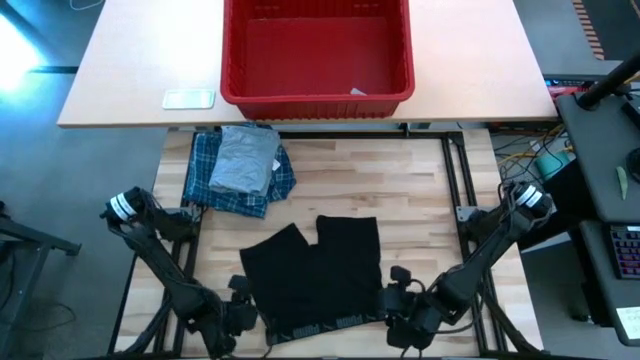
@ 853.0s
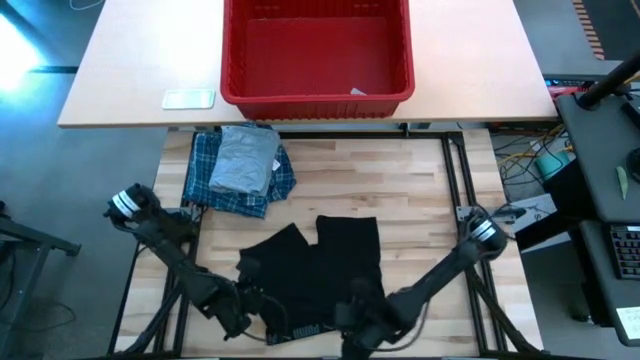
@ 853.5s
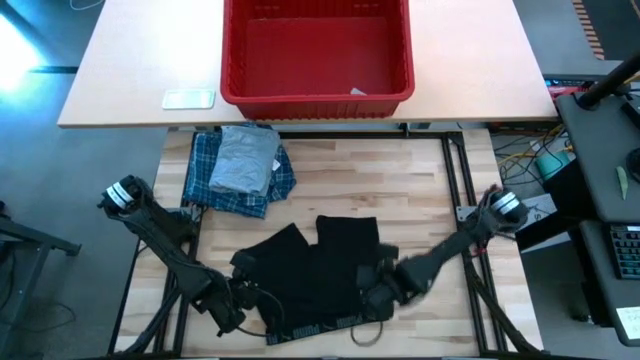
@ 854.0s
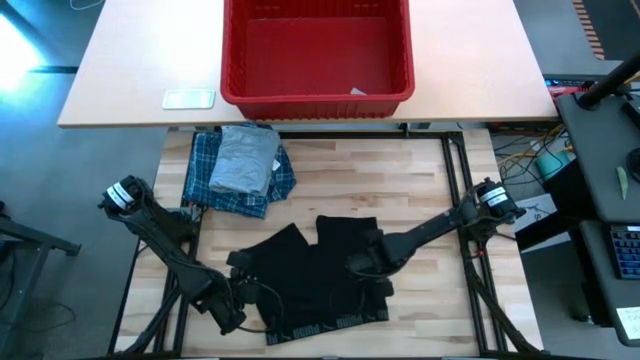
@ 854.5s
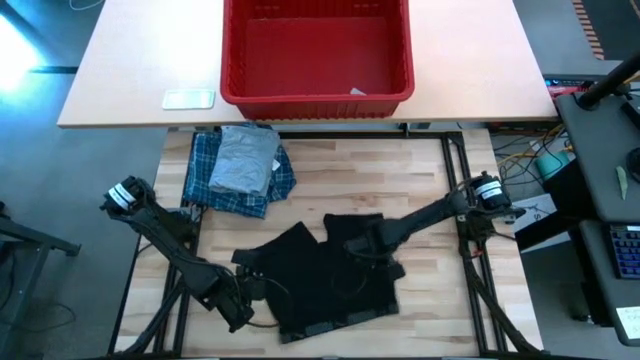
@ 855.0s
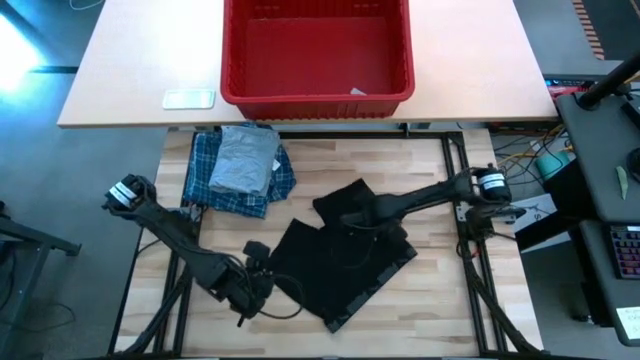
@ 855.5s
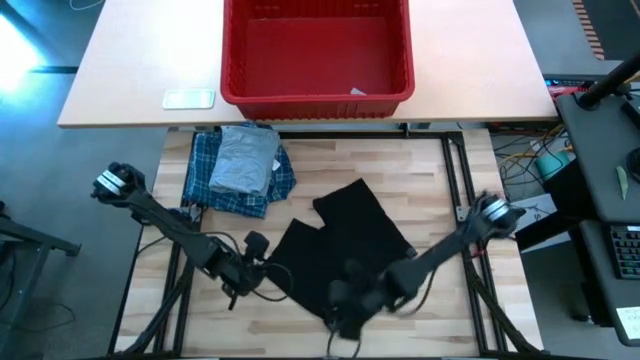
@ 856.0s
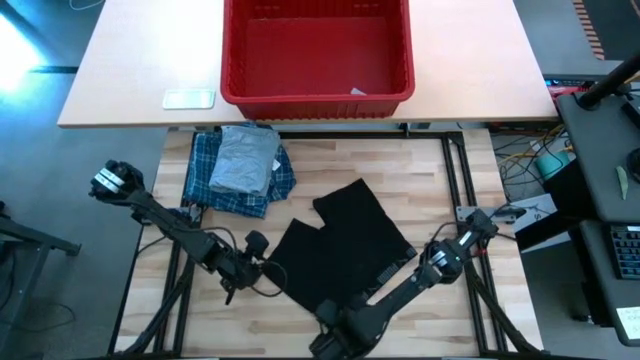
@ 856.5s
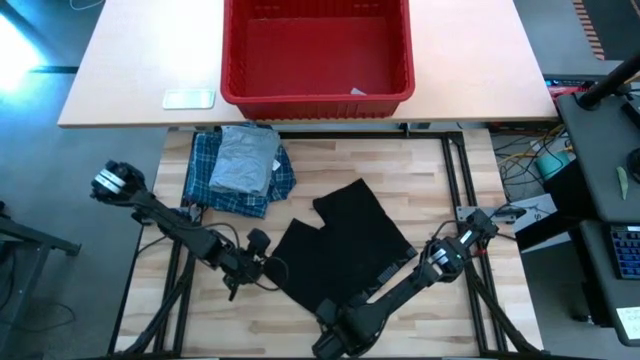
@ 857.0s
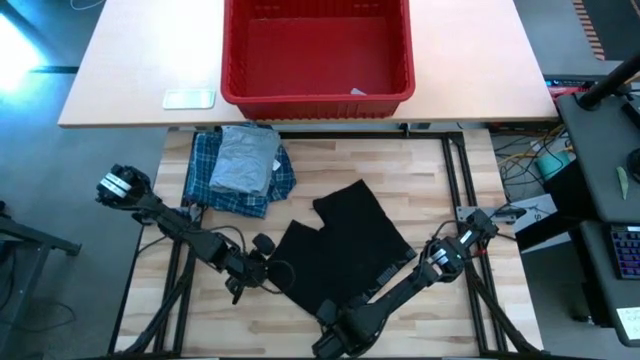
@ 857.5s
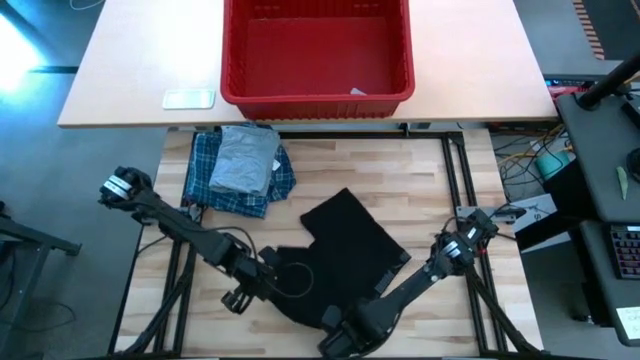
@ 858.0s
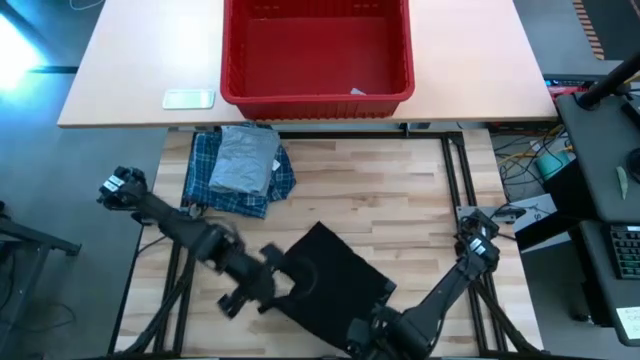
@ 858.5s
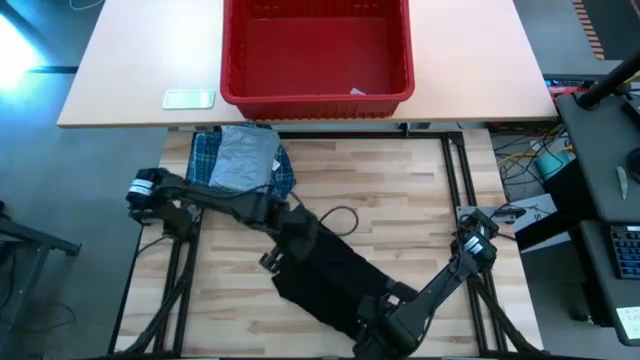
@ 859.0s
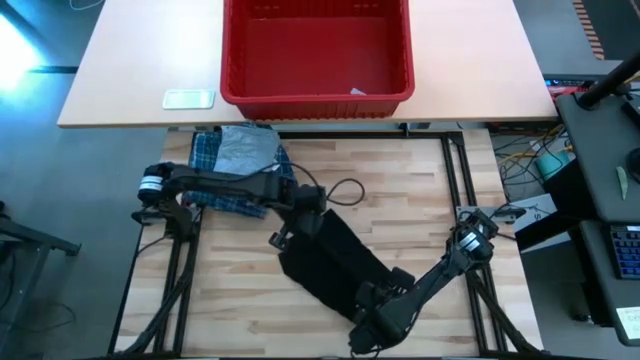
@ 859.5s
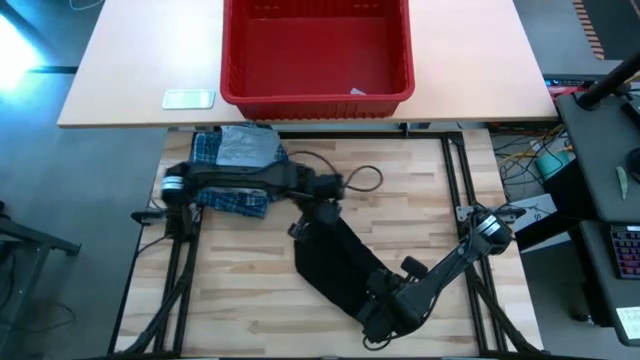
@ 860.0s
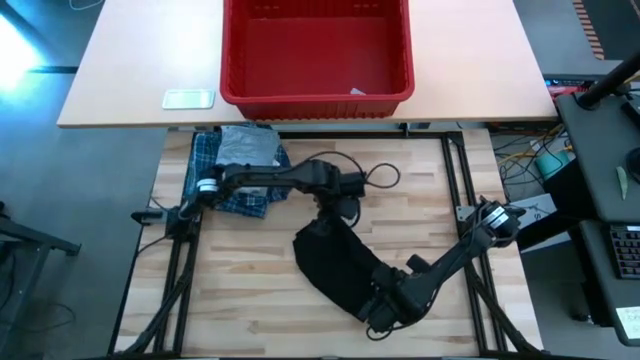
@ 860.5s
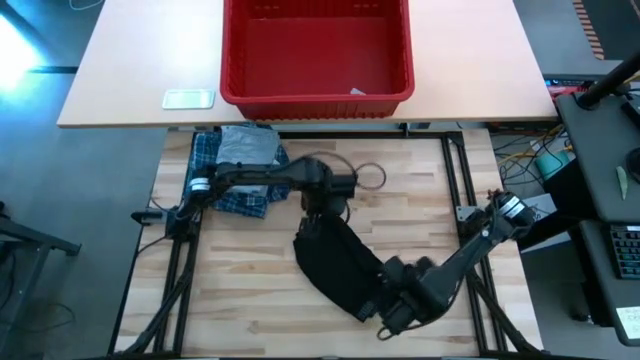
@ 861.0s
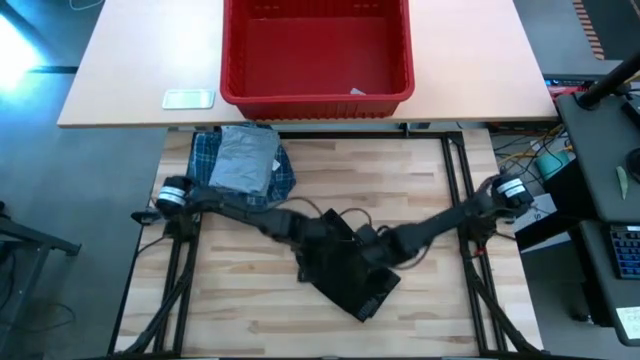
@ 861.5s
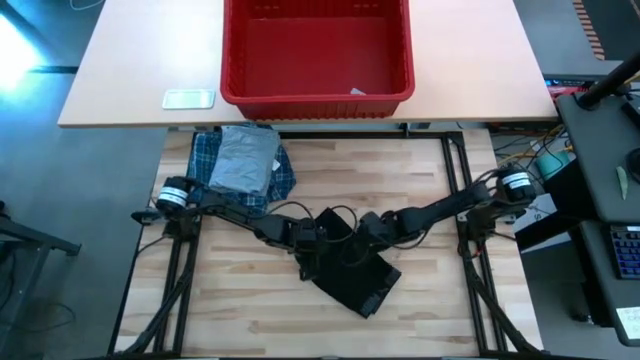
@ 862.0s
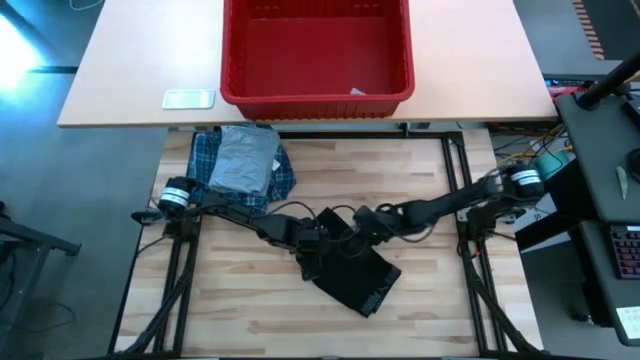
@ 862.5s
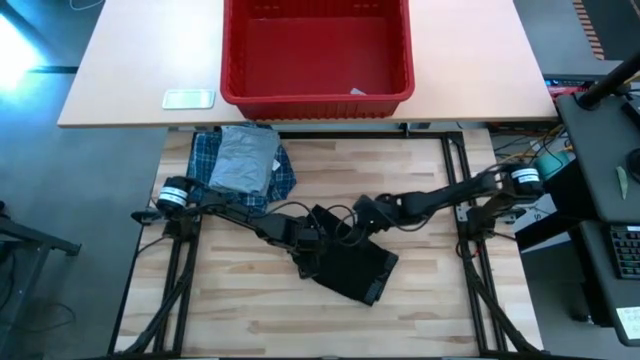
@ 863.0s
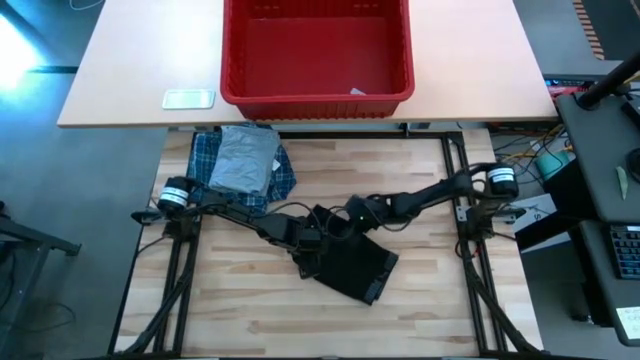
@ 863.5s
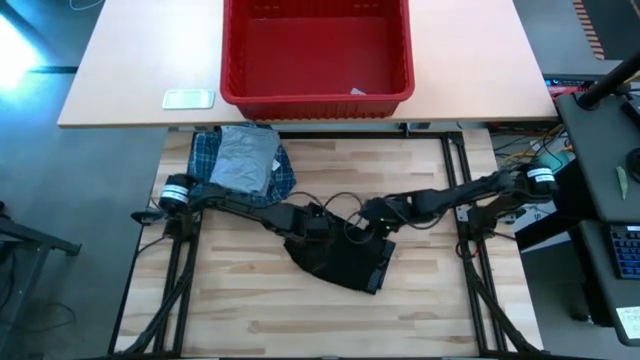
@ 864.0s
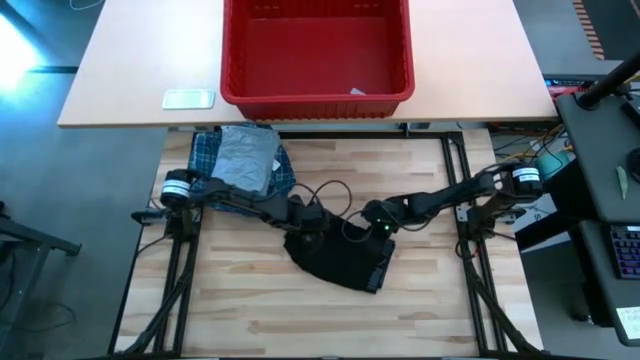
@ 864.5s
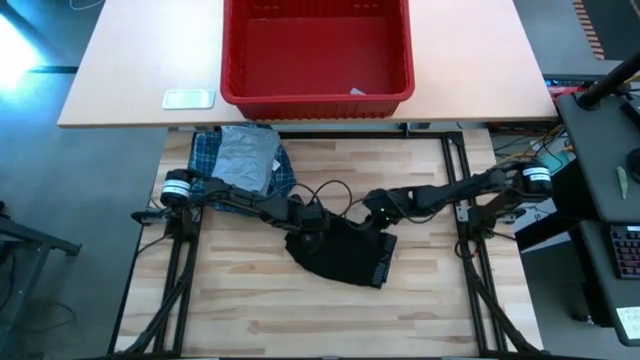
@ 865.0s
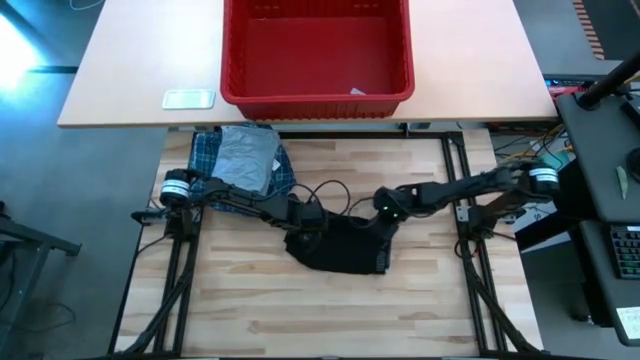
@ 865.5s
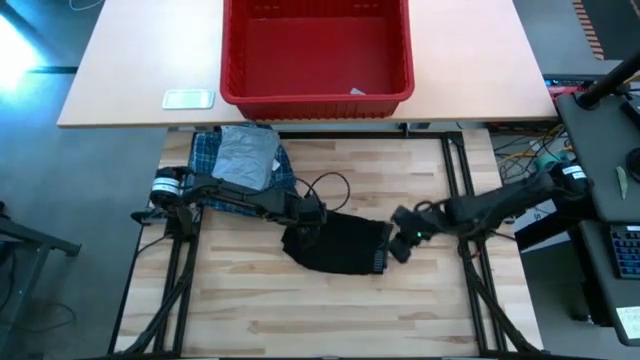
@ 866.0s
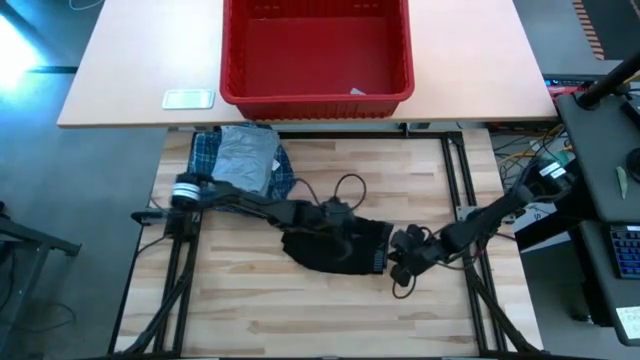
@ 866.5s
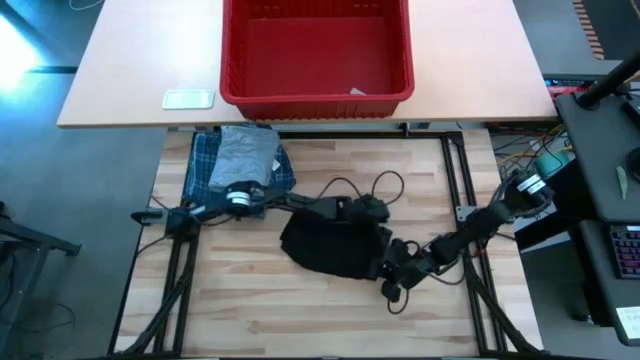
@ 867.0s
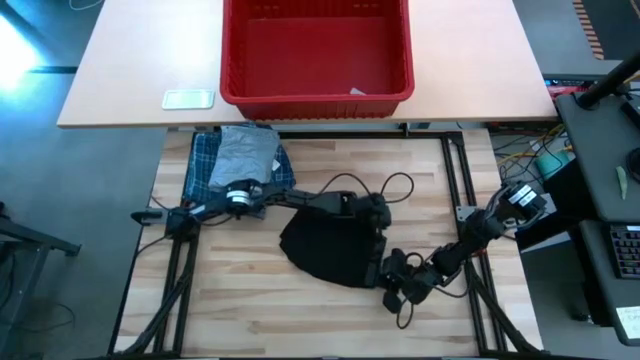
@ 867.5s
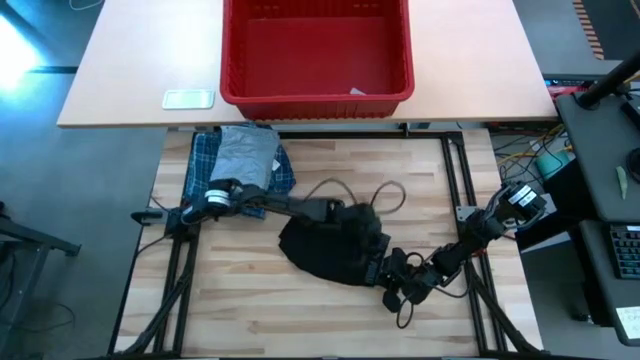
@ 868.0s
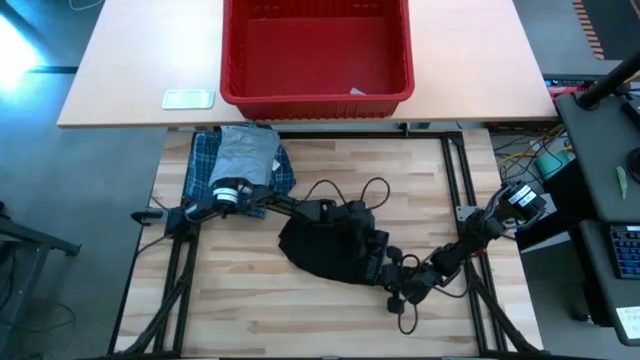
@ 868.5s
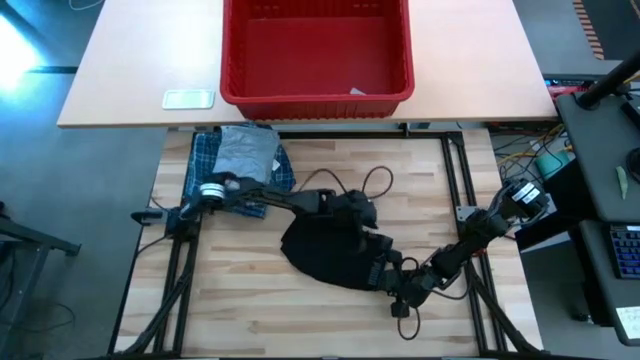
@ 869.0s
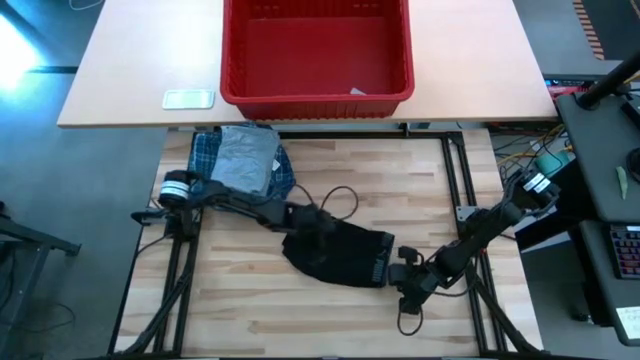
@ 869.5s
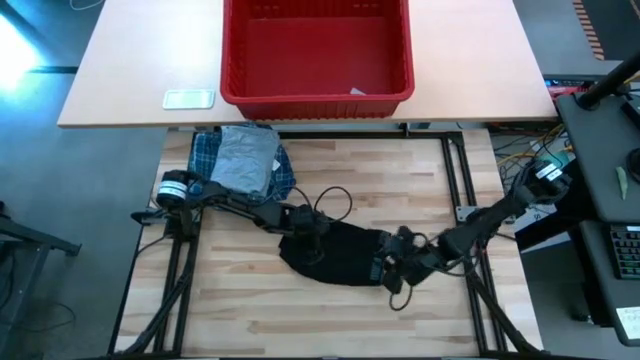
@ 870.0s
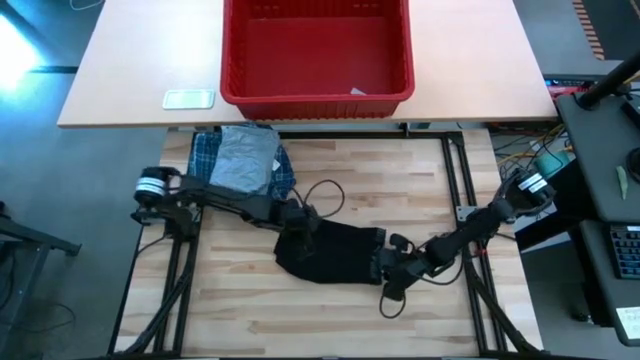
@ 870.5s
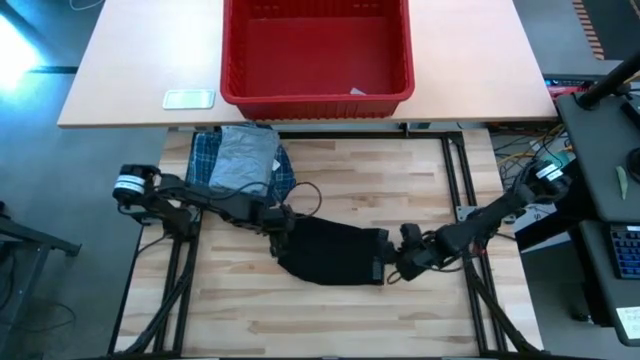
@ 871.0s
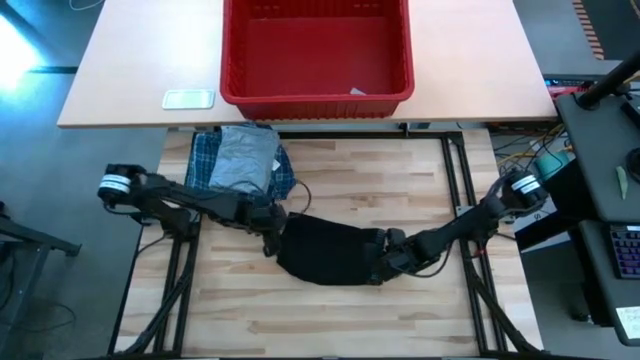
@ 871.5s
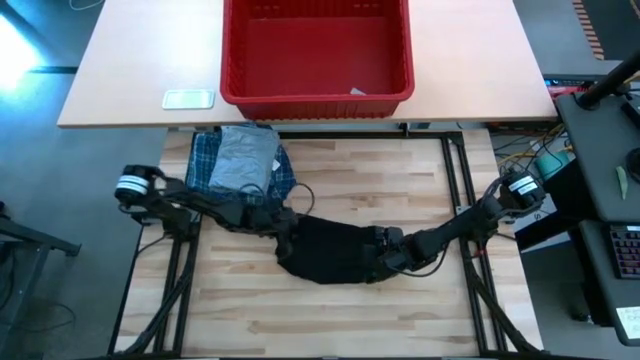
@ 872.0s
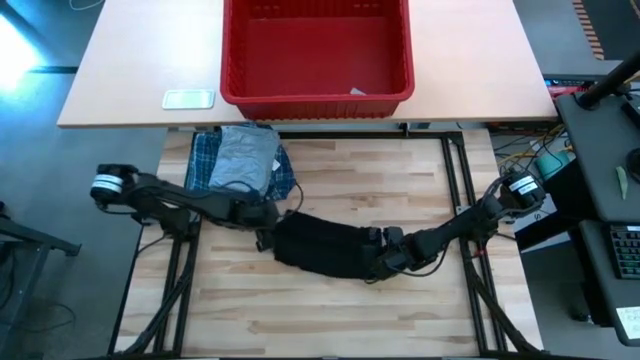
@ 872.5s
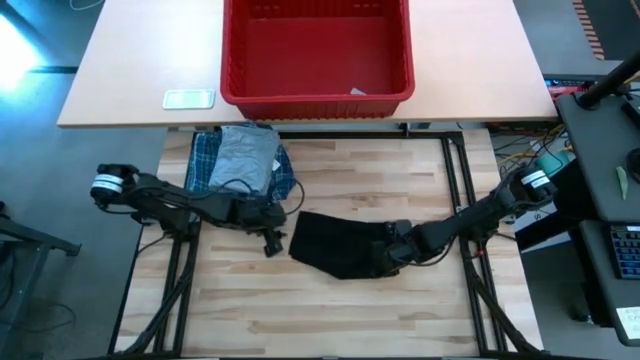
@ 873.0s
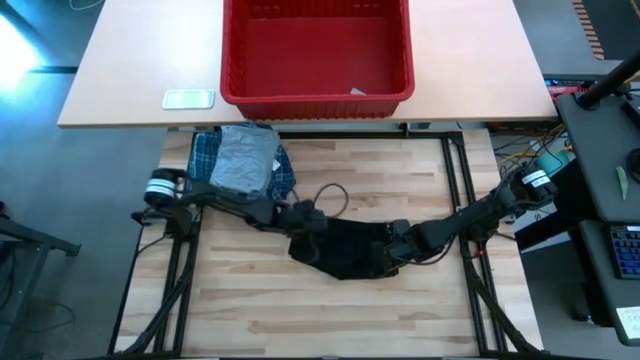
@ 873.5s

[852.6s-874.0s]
Task: Fold Laundry from Bin
Fold the black underwear

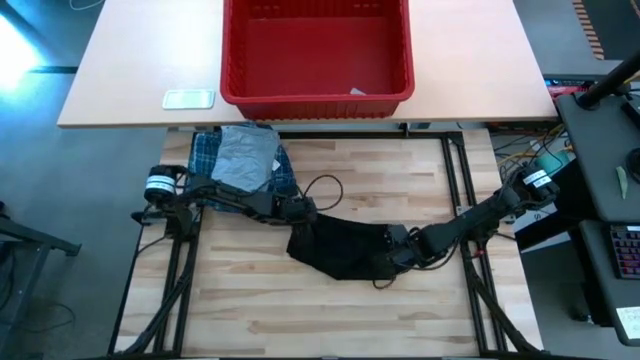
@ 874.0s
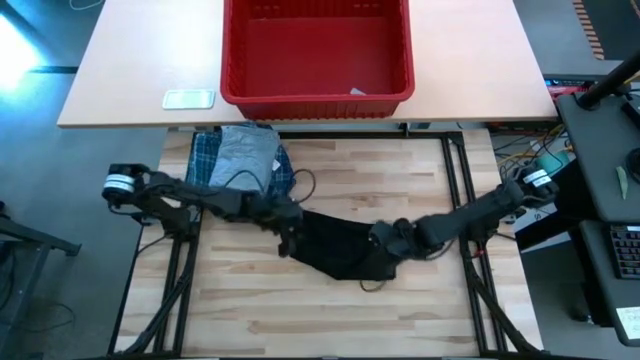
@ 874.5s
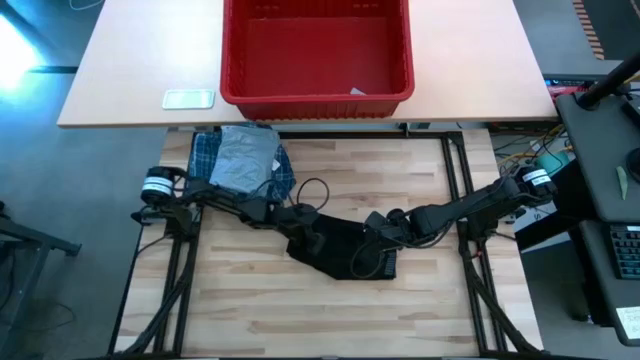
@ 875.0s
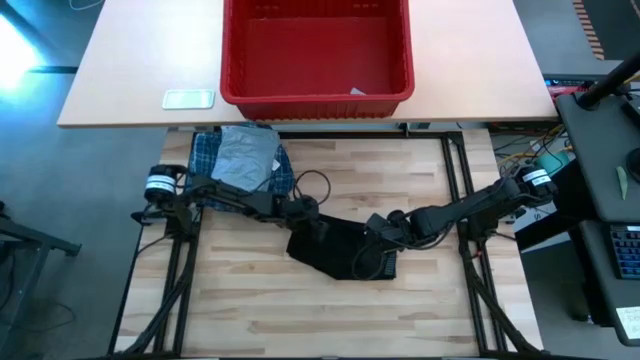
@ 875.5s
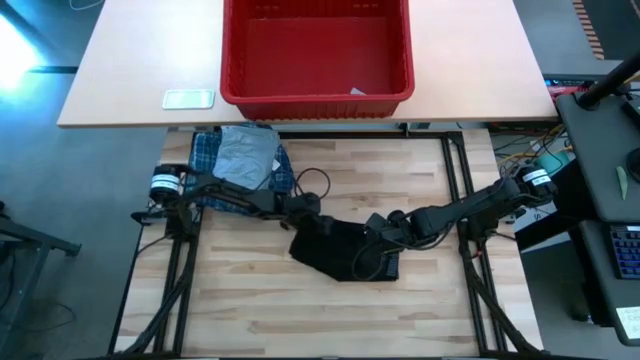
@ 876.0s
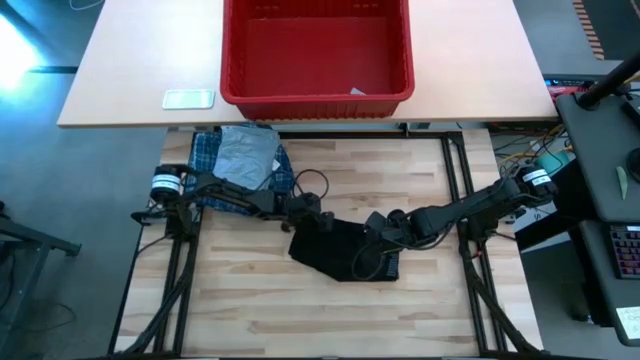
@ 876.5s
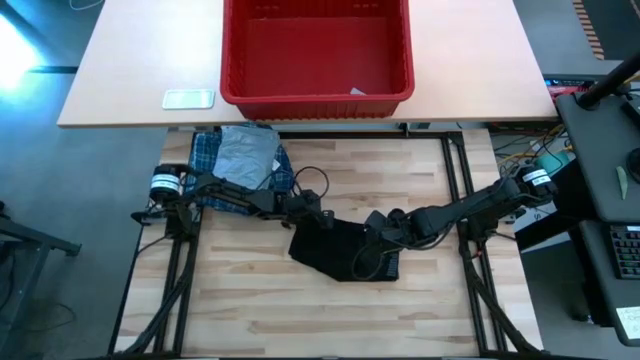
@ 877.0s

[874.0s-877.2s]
Fold the black underwear
